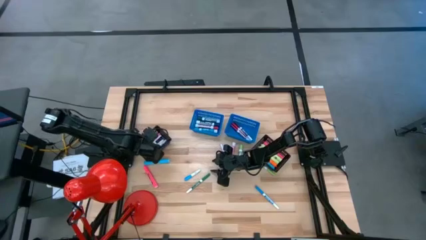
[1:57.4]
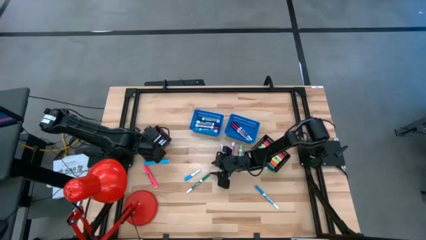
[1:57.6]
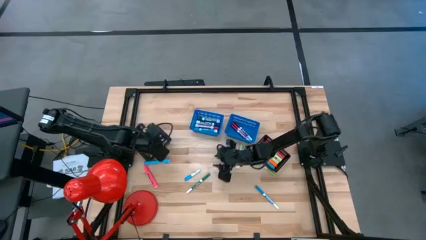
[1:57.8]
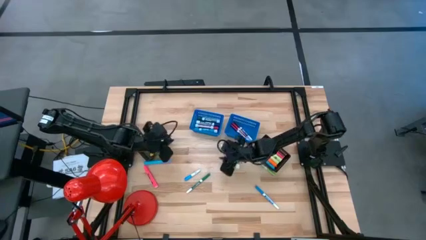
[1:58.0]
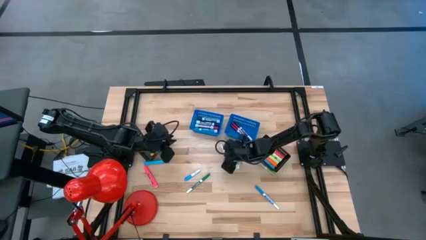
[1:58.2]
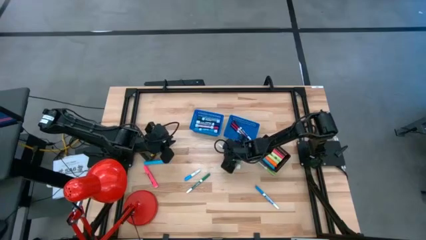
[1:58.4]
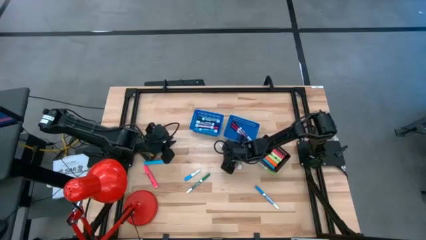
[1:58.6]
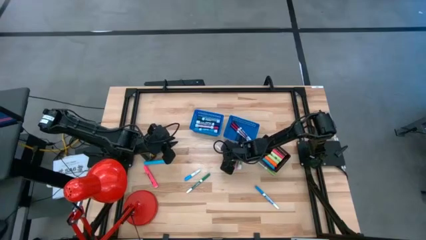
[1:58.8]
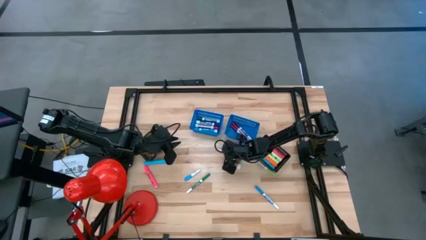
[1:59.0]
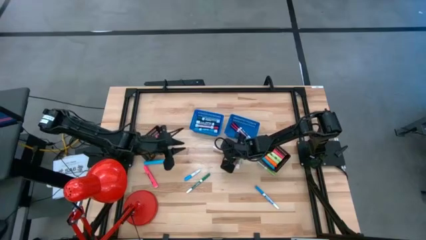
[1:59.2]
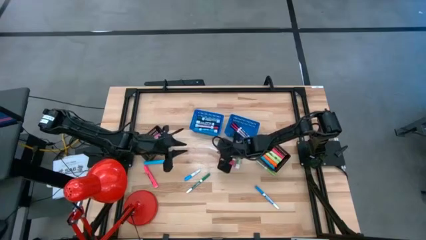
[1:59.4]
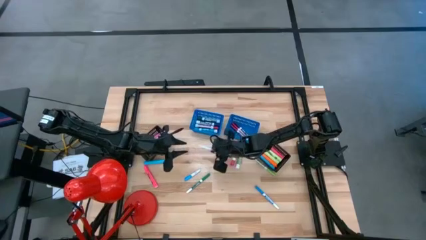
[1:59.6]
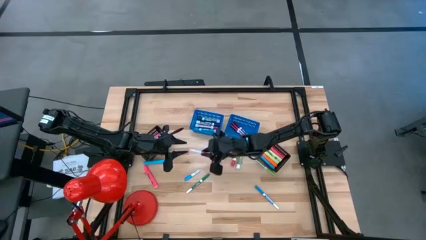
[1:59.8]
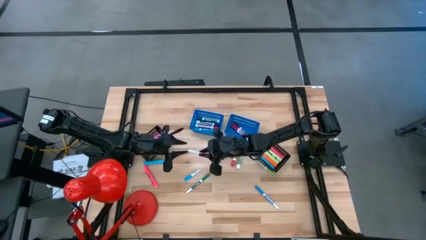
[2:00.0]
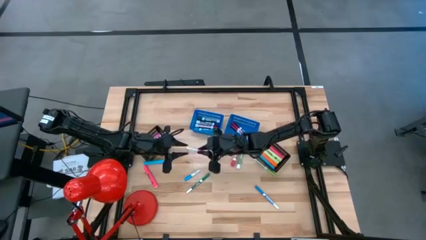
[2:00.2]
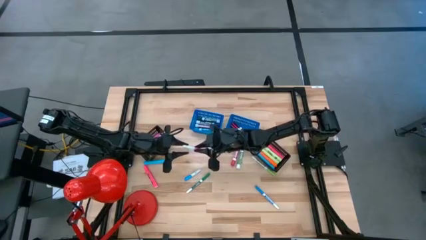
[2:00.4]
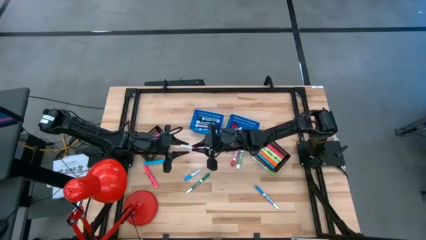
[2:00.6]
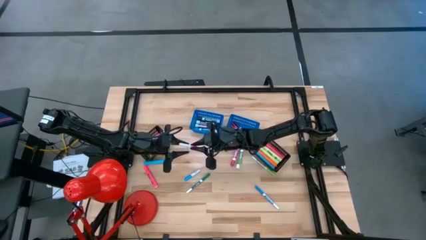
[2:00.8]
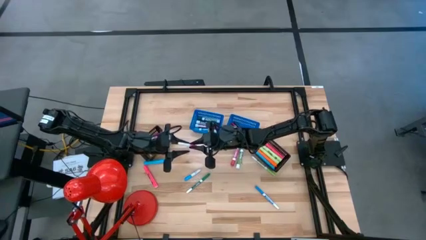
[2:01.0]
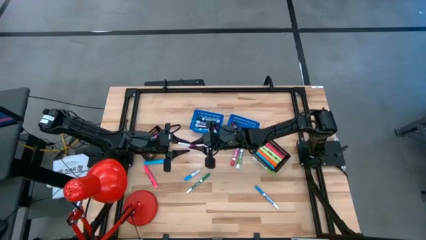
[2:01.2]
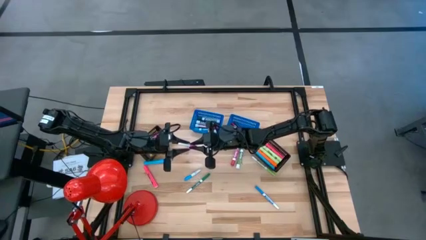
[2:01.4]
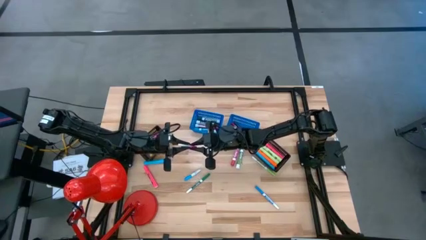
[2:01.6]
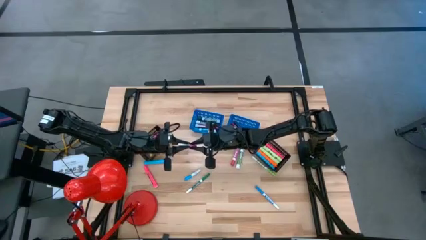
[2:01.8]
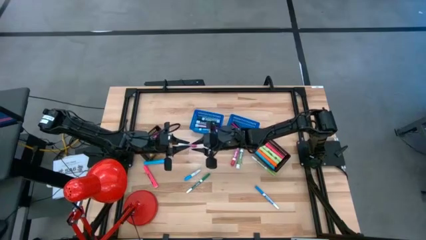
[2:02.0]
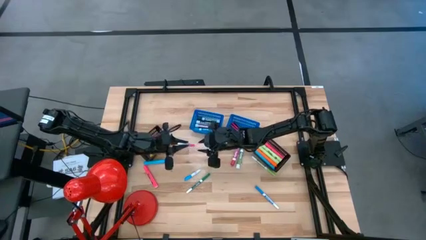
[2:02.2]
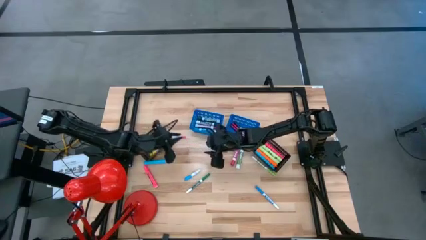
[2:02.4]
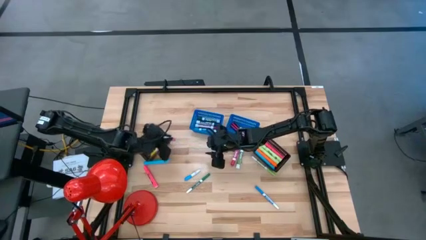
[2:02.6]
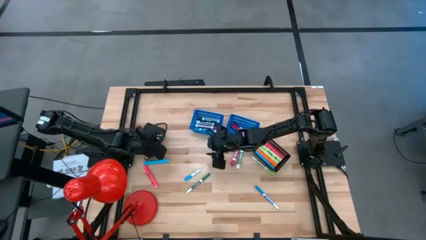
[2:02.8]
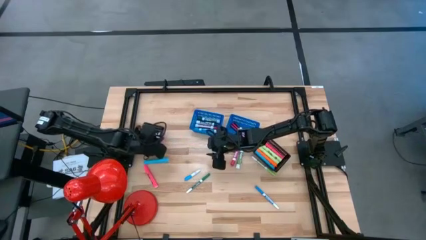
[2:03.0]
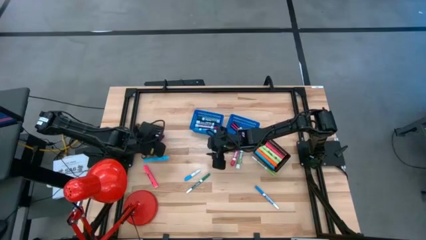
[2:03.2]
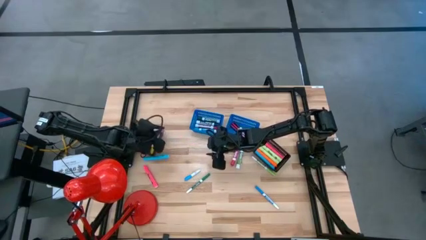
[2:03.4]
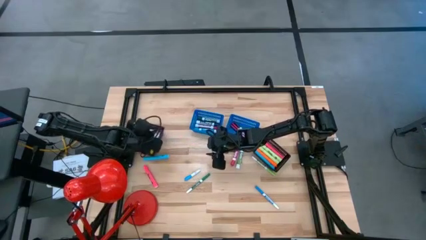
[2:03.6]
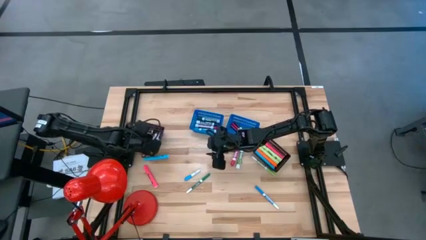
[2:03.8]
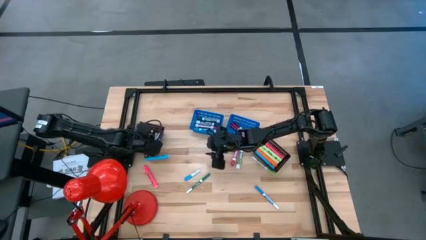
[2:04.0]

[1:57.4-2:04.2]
Task: Pick & Place Markers
Put the pink water marker into the left black bin

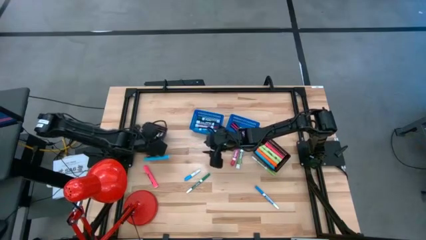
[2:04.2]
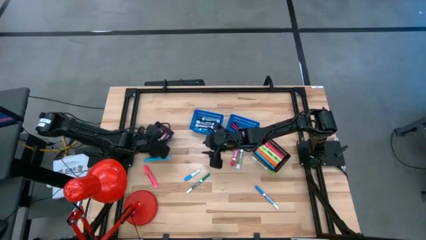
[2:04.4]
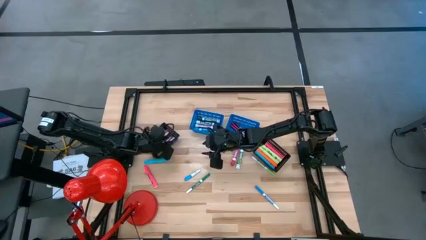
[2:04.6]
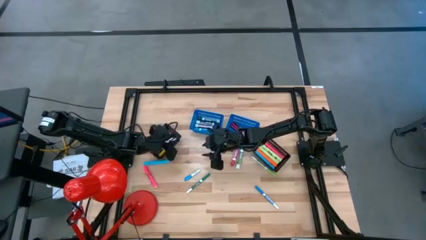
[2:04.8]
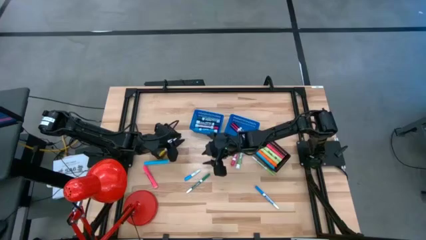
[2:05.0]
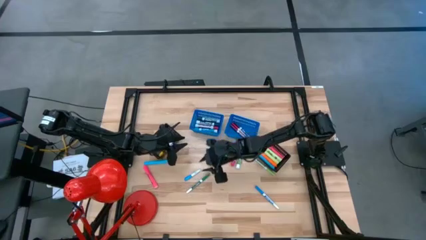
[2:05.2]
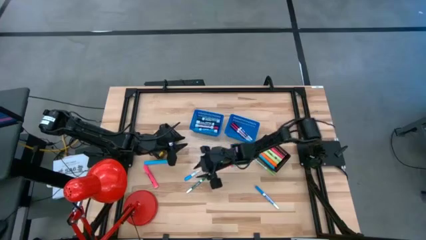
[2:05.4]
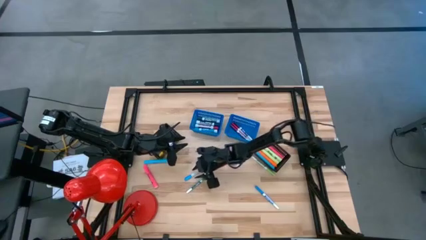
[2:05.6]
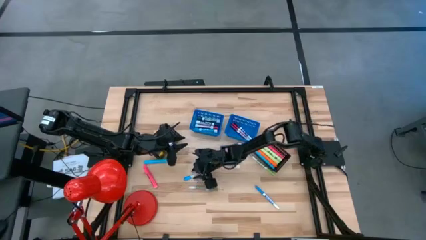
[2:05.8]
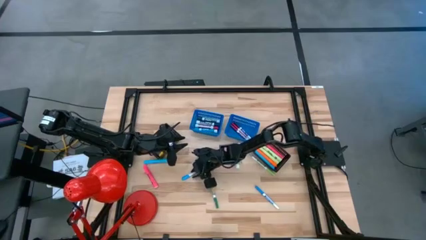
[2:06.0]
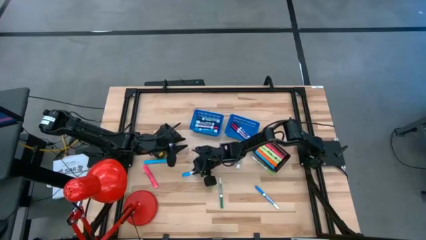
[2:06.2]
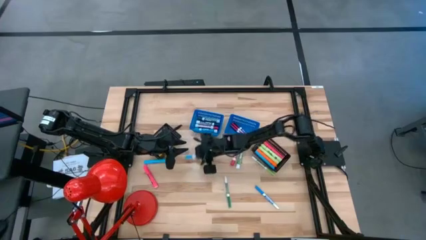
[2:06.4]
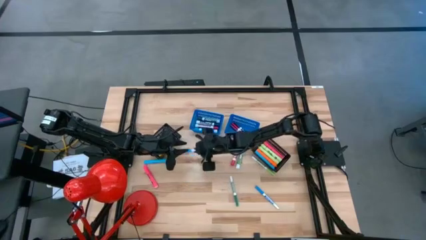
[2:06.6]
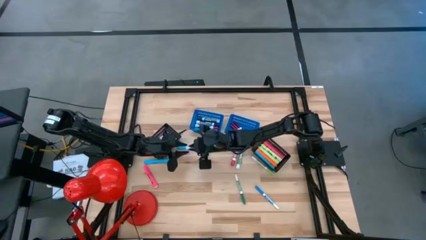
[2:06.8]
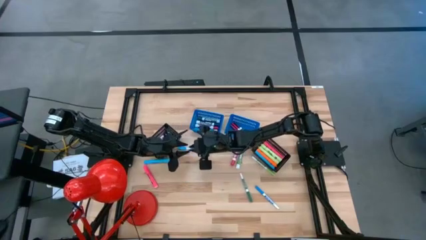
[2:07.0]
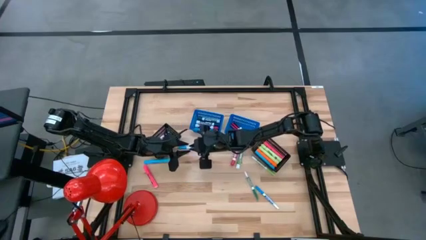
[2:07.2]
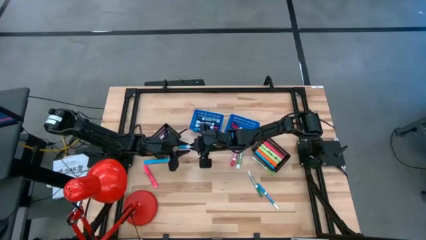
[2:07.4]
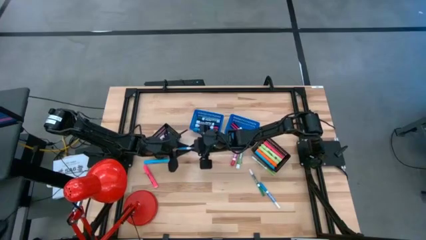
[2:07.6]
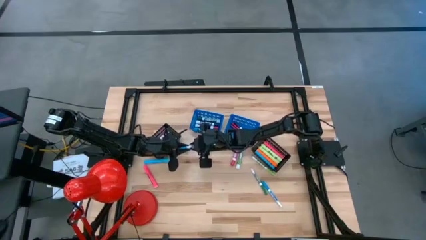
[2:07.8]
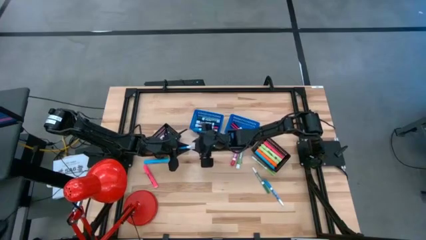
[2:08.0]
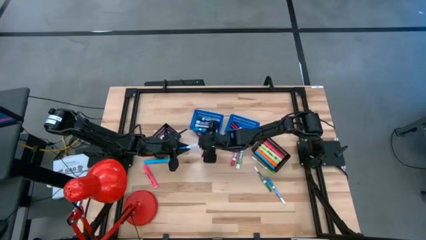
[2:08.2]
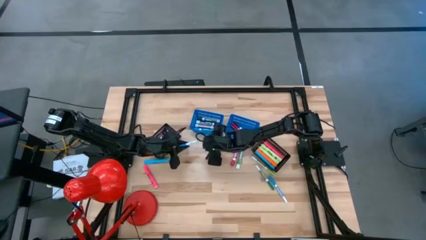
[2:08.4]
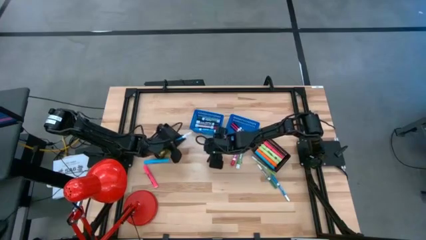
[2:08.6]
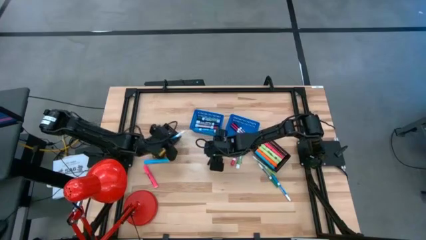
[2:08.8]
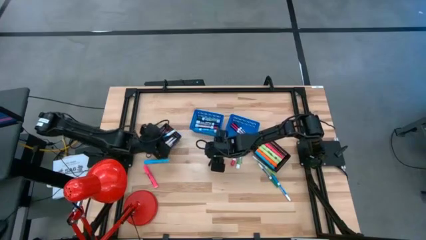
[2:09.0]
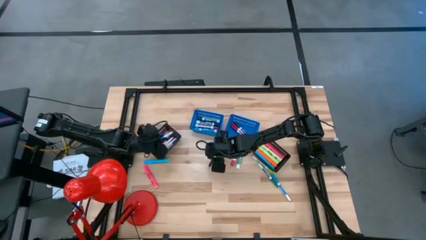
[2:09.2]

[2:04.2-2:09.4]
Put the light blue water marker into the left black bin

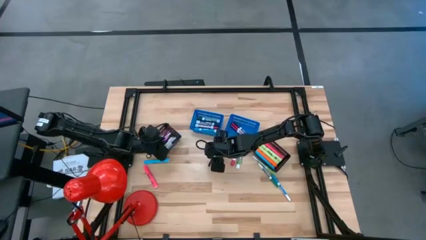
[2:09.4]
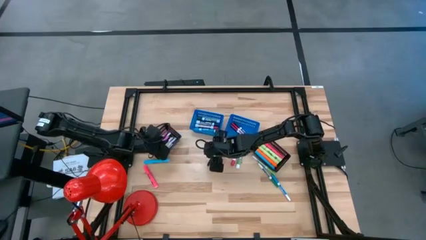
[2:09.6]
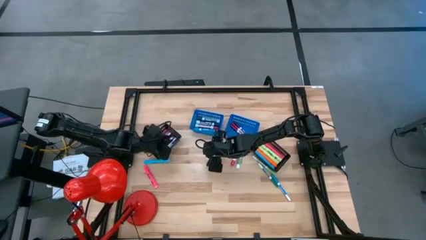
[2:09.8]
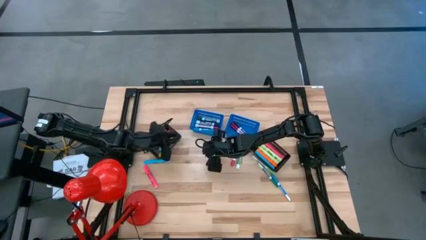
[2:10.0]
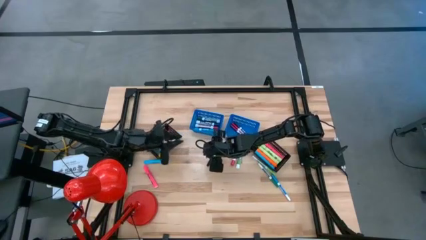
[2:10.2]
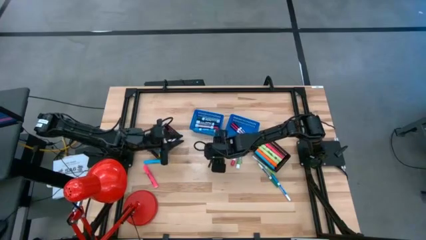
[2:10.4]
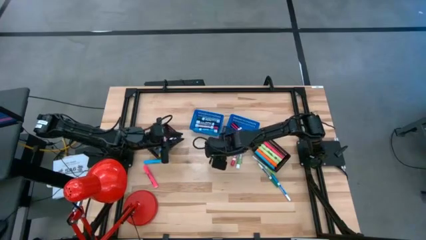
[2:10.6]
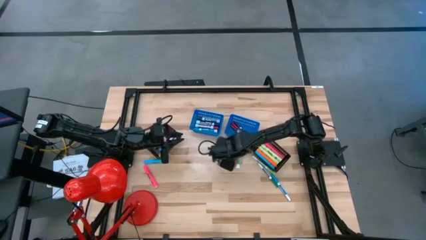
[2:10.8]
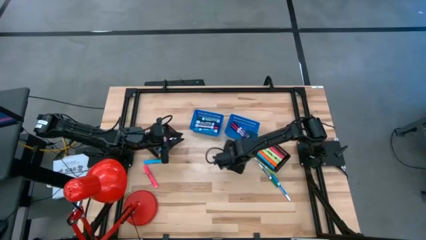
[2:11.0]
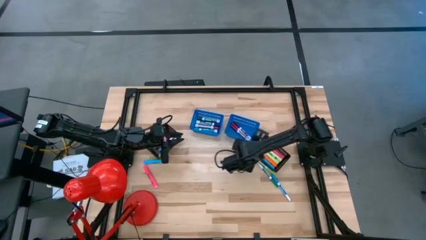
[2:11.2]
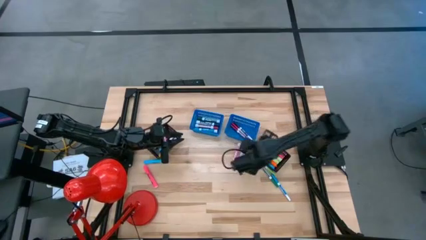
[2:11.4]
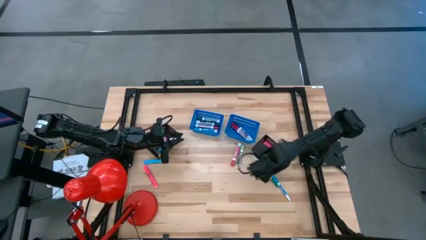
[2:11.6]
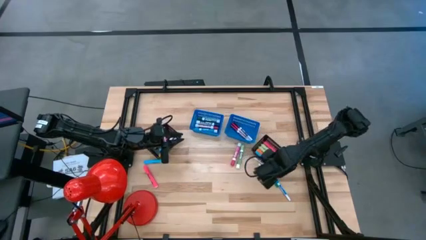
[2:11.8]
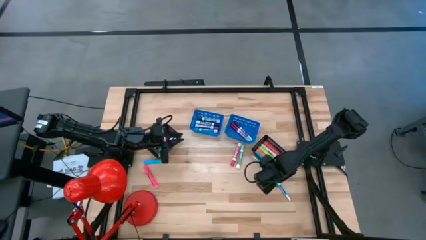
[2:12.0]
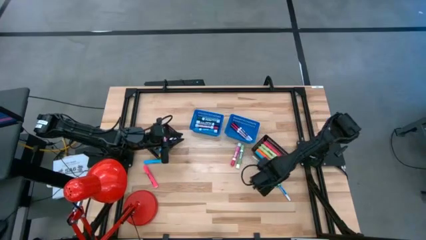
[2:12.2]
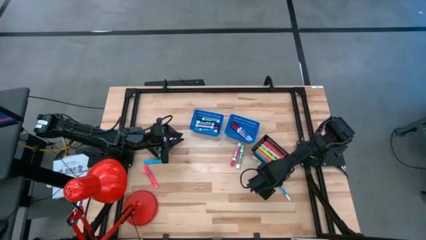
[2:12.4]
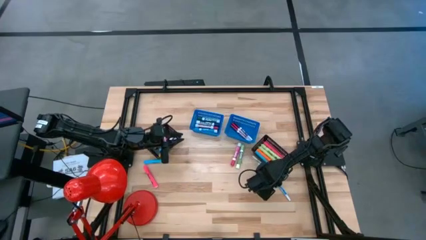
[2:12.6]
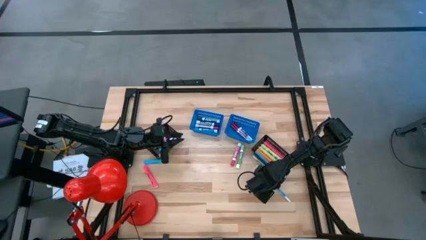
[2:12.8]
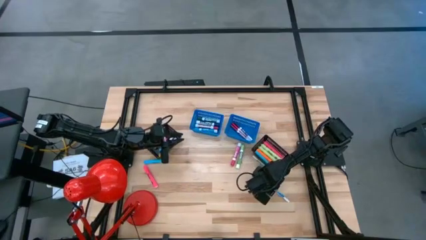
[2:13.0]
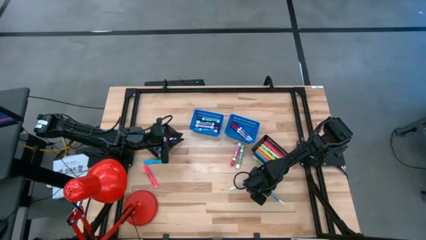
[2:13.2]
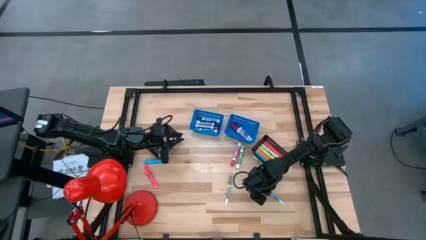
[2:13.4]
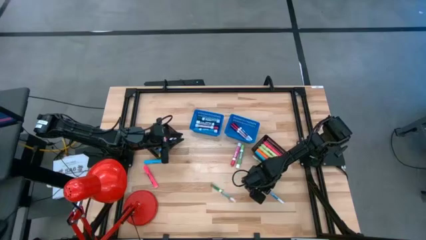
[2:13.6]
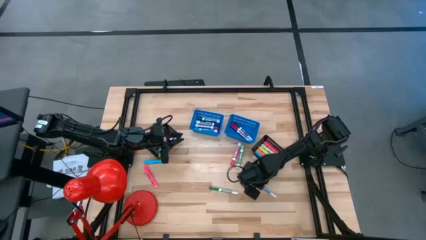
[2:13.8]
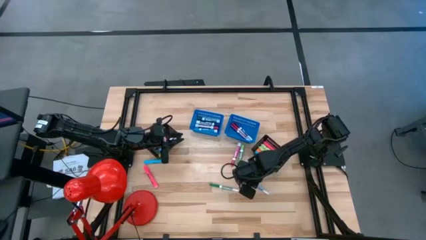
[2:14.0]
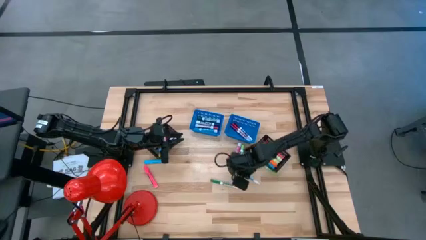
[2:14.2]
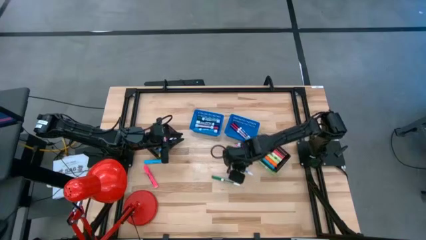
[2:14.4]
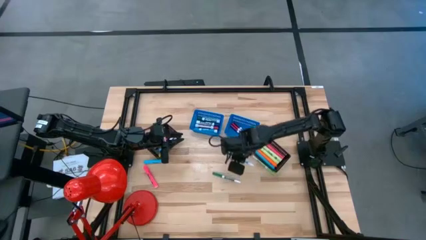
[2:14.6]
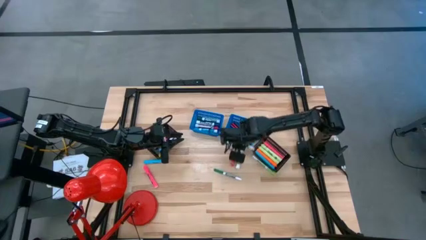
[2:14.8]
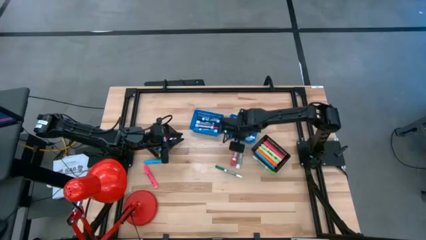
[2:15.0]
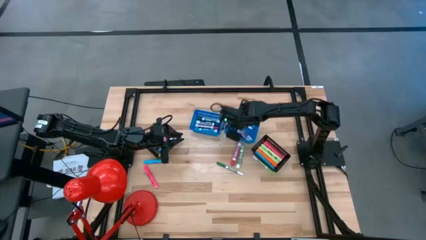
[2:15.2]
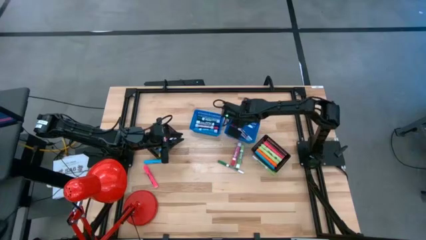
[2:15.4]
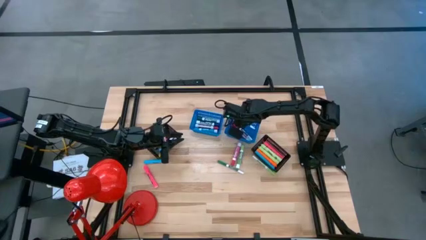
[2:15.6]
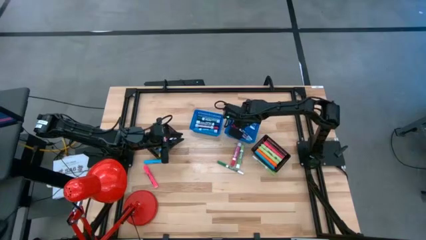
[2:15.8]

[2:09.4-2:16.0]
Put the light blue alcohol marker into the right blue bin
